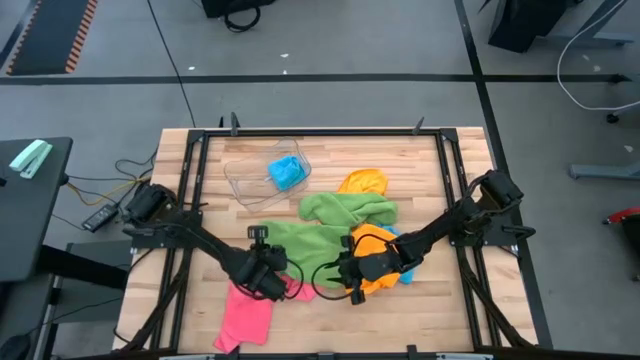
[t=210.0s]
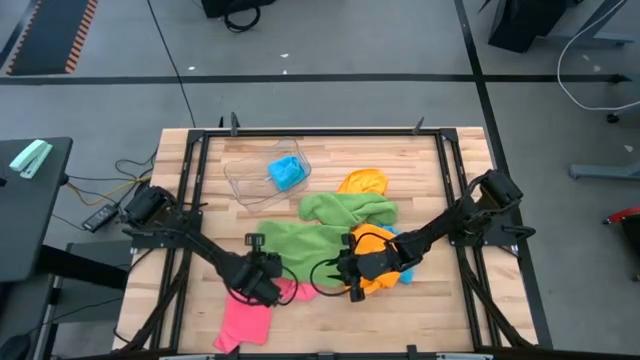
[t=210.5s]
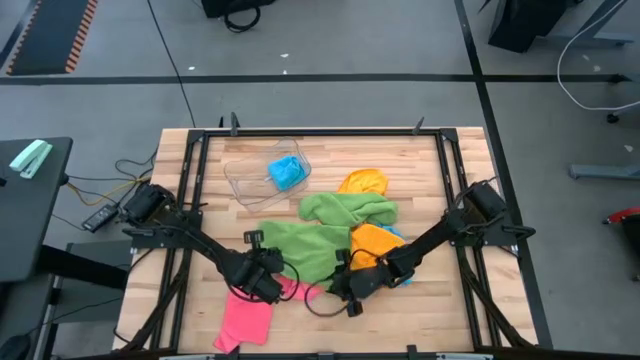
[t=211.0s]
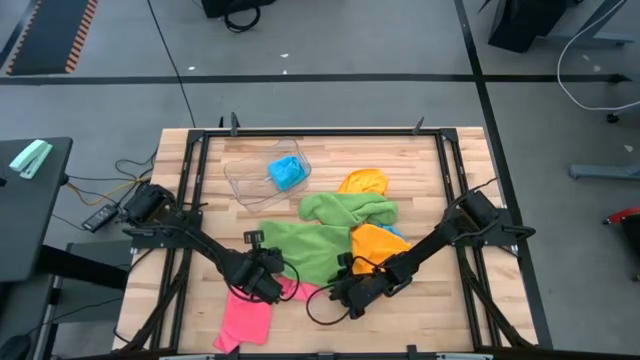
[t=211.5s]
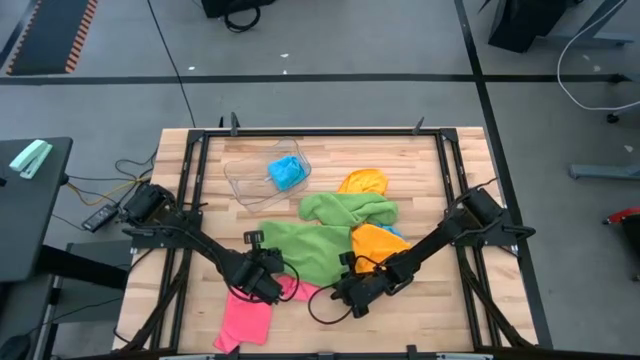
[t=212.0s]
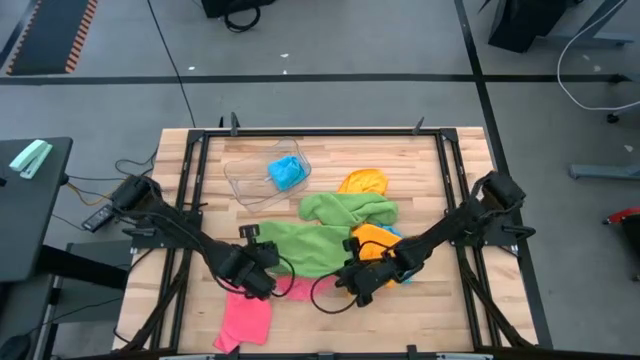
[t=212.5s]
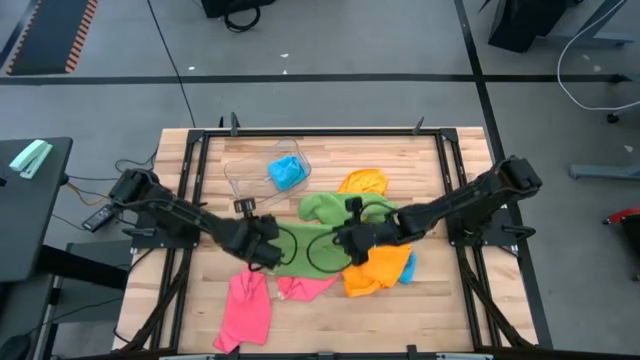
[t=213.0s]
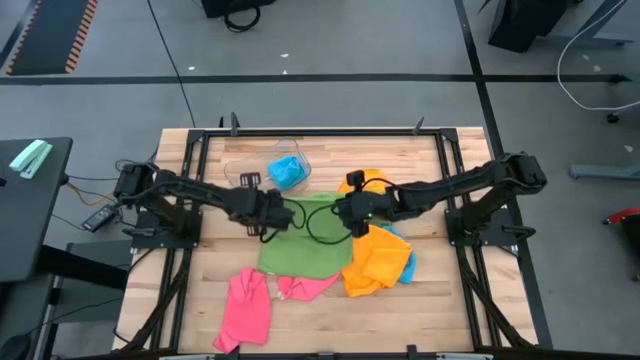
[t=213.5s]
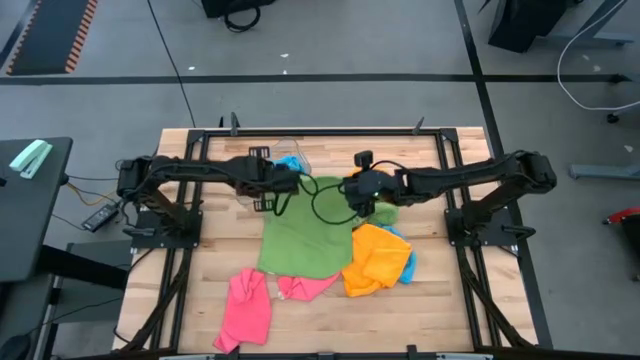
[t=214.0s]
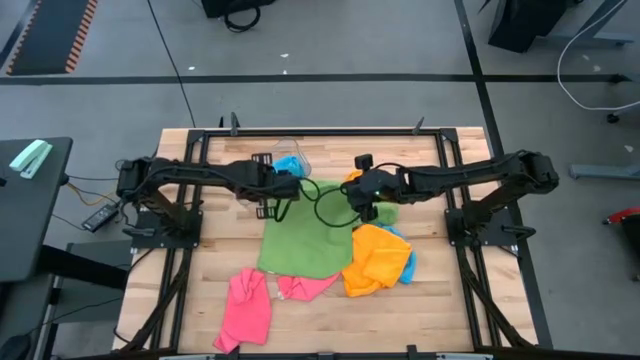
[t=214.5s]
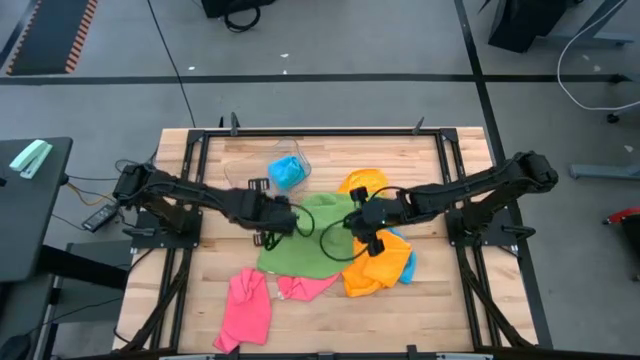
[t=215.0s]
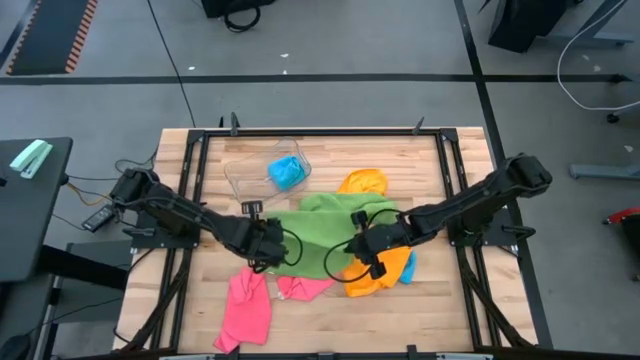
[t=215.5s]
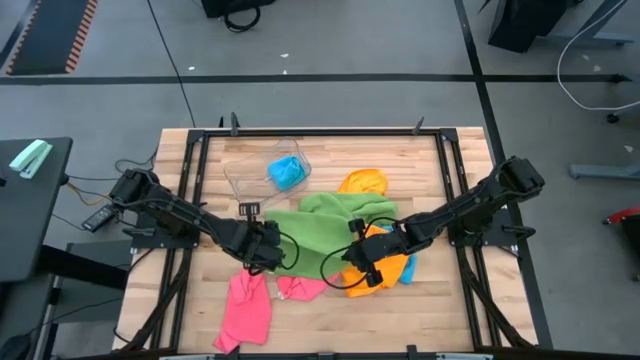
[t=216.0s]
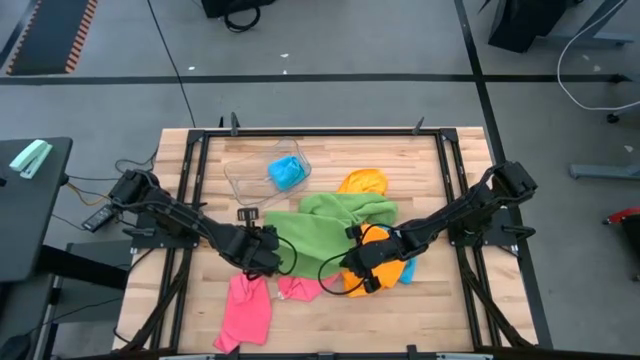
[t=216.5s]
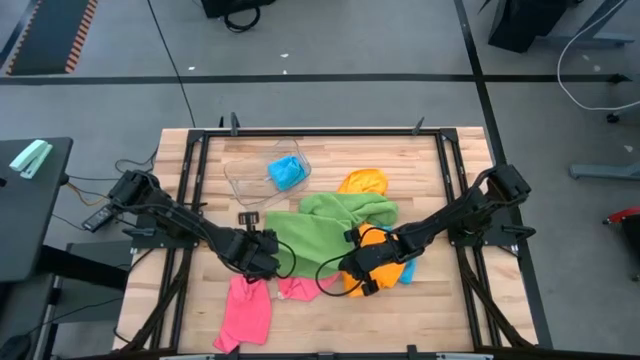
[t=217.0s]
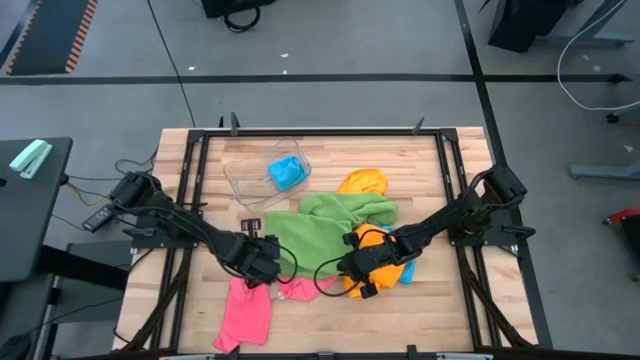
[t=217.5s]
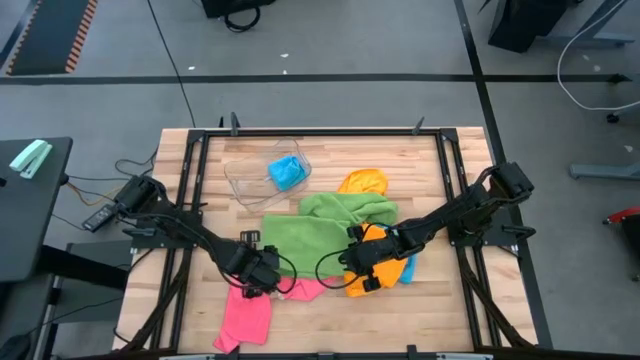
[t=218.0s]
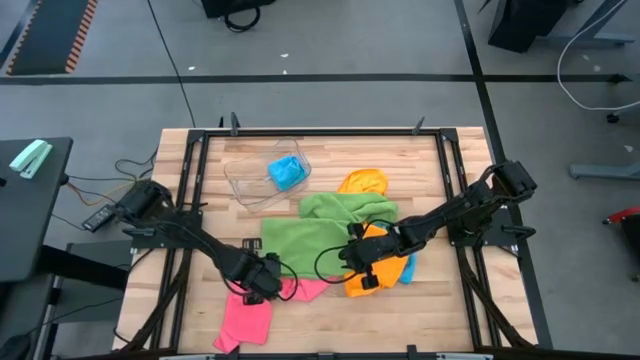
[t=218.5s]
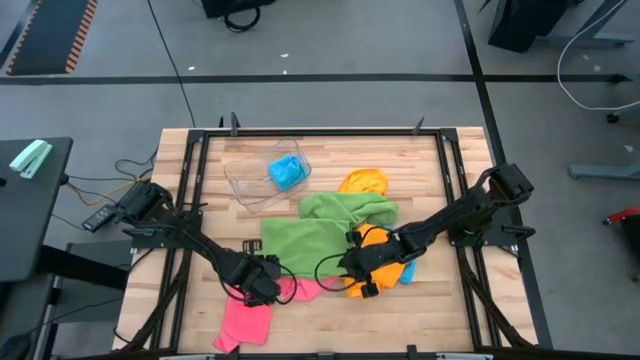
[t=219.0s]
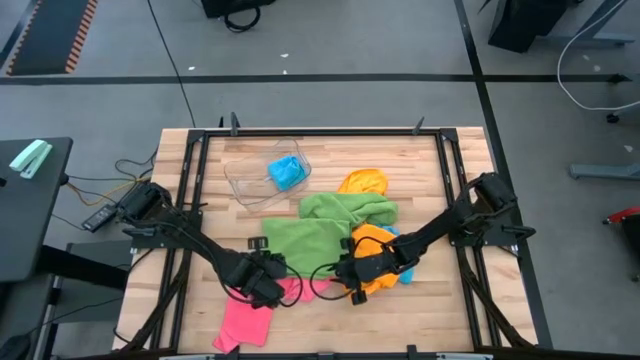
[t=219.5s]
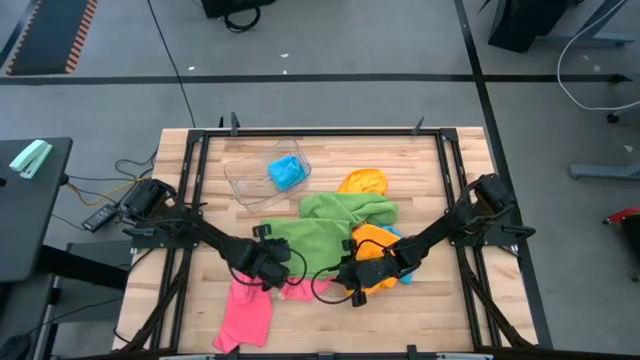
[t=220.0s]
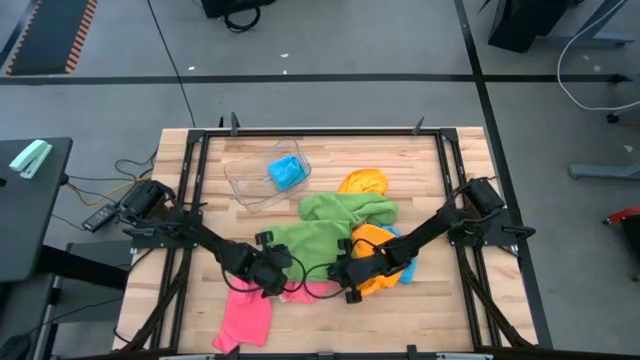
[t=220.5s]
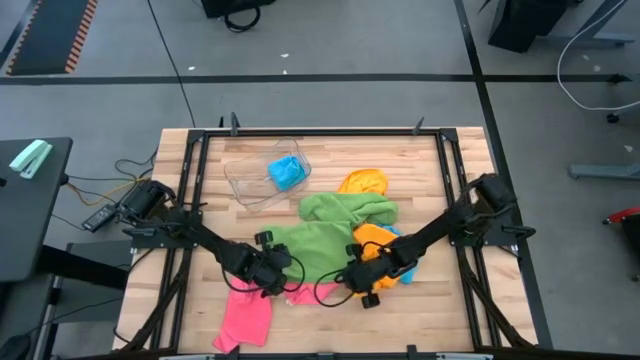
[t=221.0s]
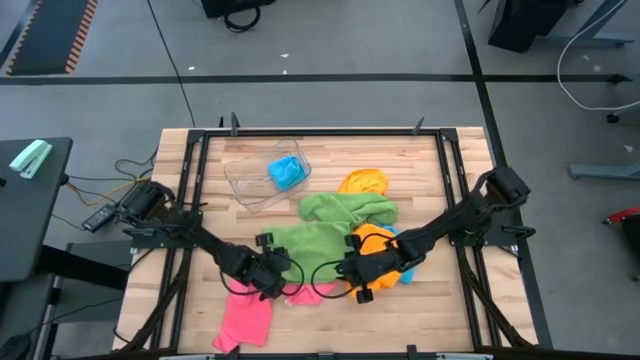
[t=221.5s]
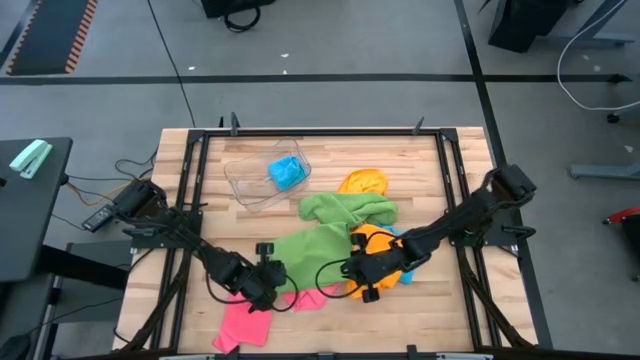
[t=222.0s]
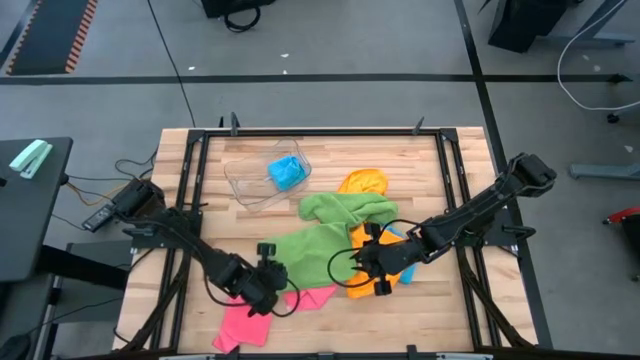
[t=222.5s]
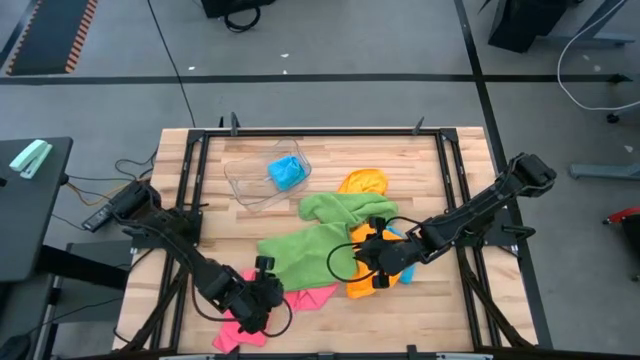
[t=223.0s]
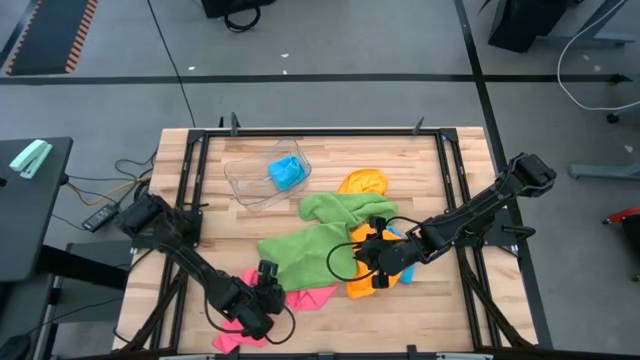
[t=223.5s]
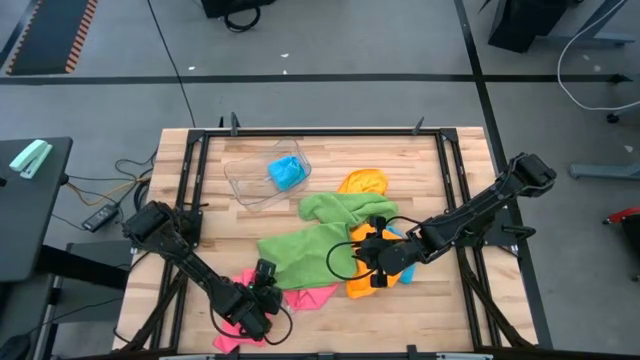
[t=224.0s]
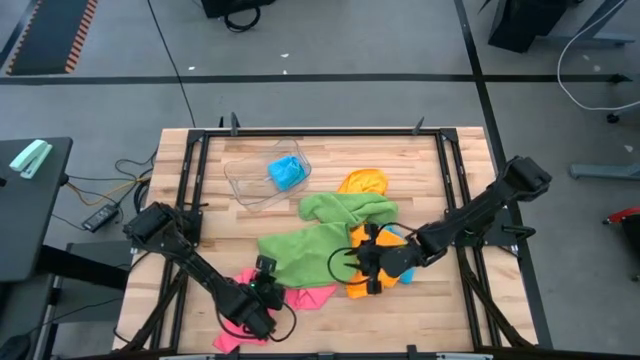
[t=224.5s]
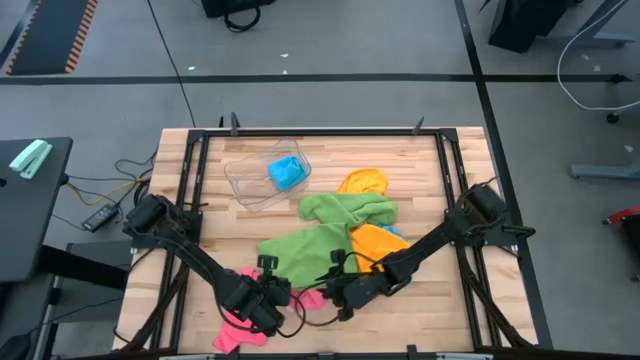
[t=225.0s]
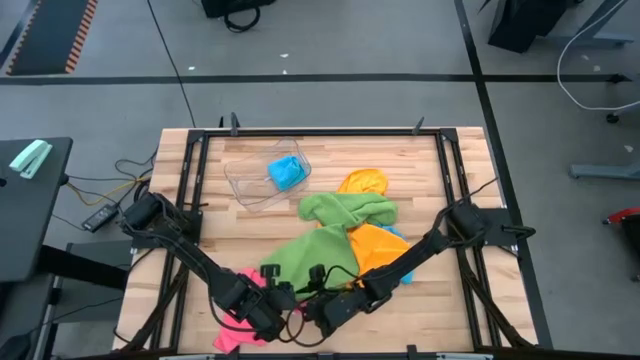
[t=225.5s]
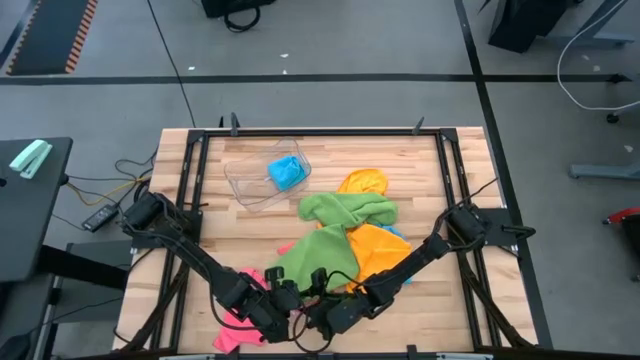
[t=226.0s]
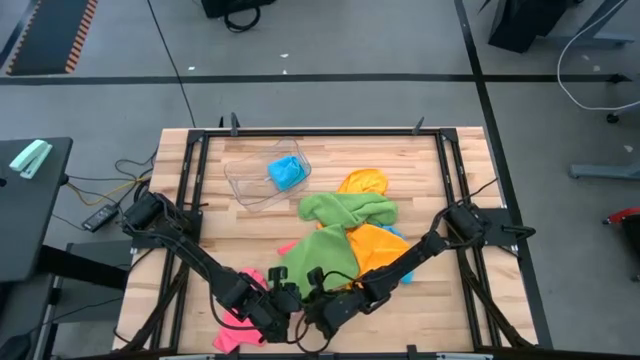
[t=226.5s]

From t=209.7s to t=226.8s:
Task: Fold microfiber towels
Fold the left green microfiber towel

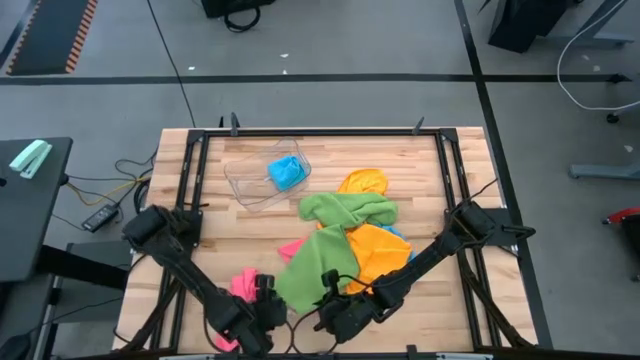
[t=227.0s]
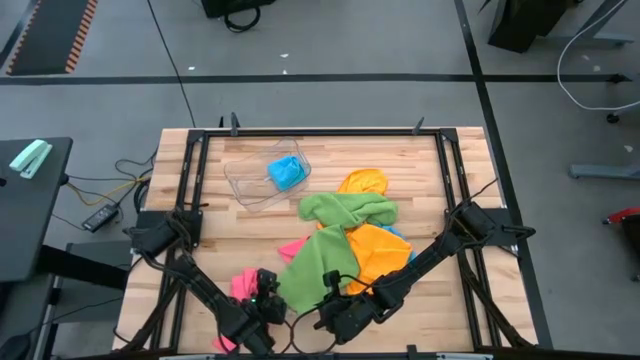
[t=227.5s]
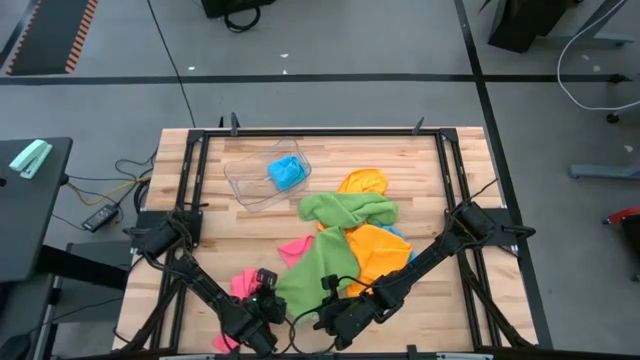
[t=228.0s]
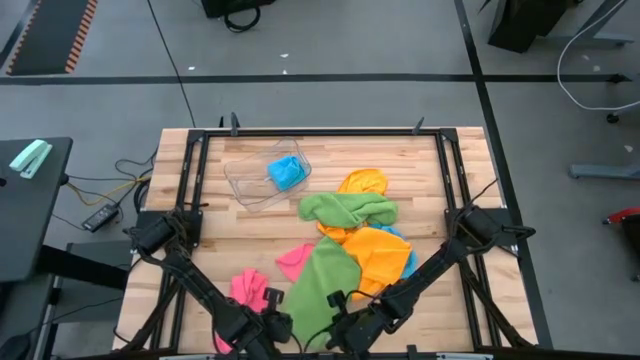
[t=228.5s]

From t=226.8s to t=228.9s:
Fold the left green microfiber towel

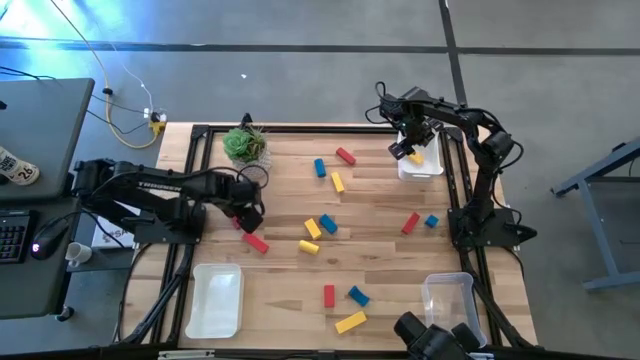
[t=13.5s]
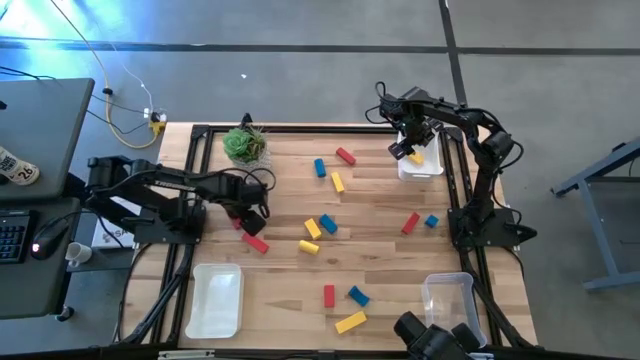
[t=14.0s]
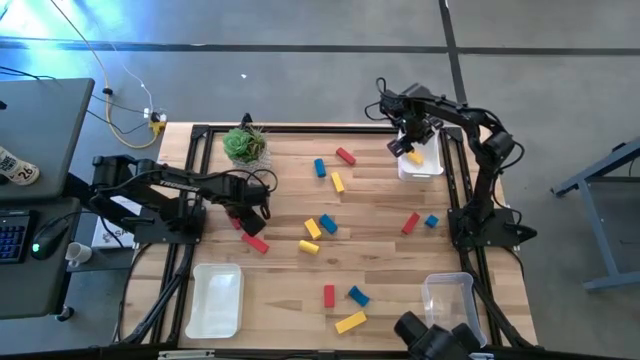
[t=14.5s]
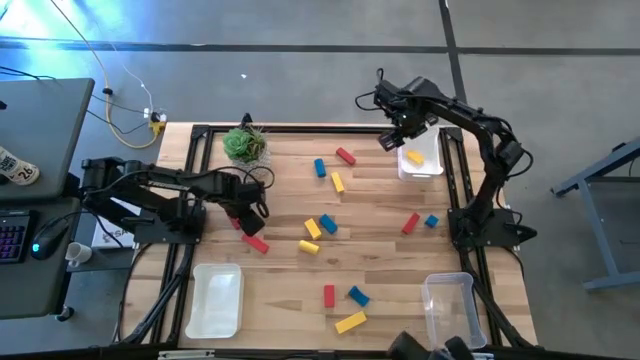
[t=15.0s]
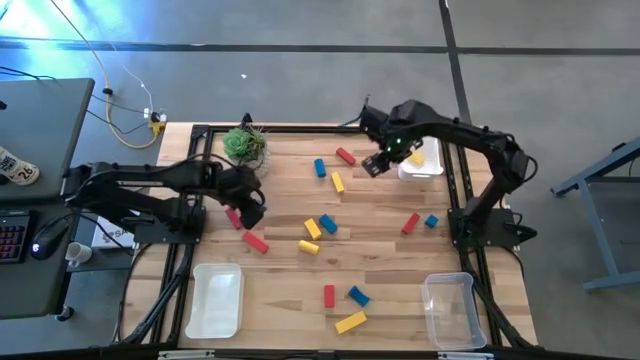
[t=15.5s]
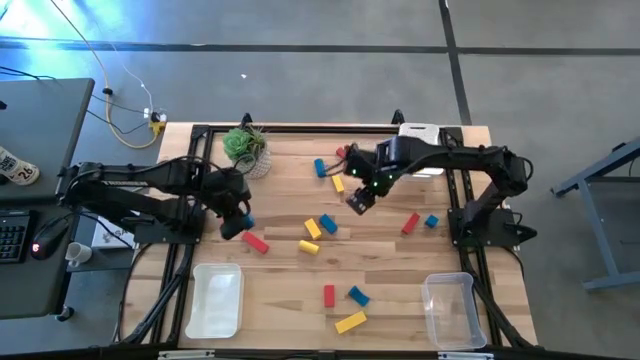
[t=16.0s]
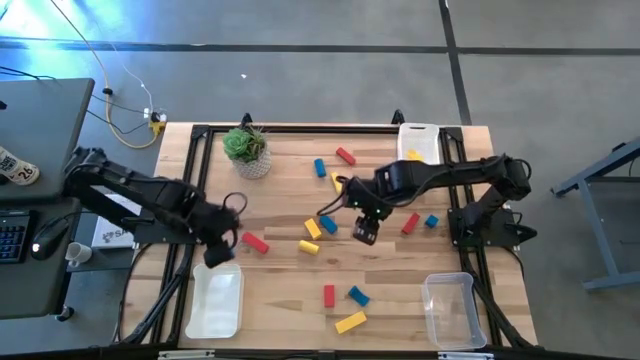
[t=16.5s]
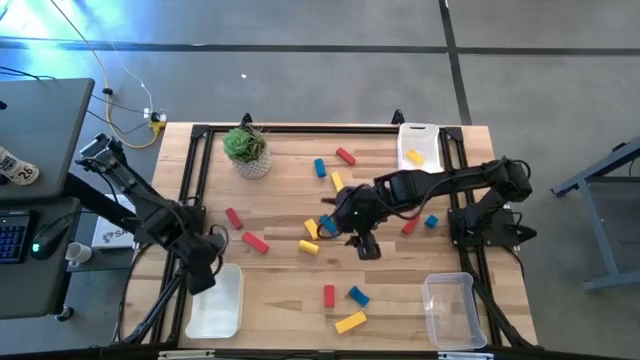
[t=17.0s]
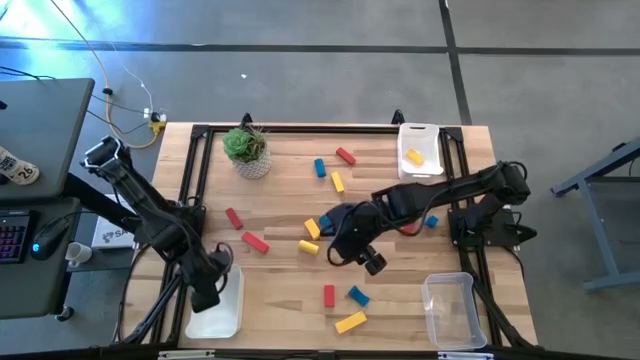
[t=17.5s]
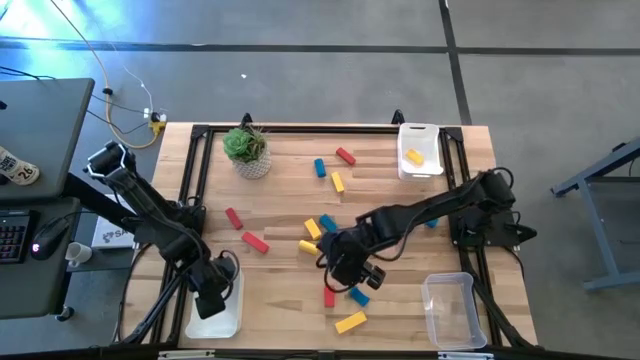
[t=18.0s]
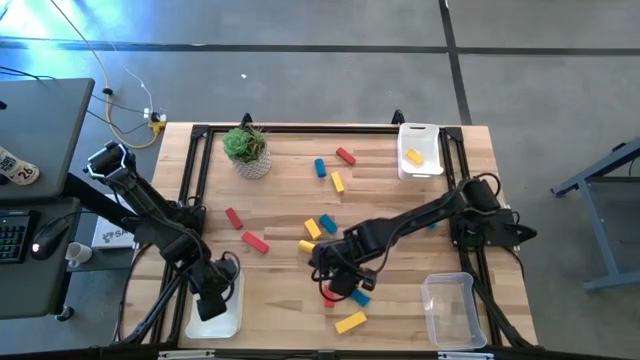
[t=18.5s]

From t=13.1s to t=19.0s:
Task: Sort & place blocks by color
Put the blue block into the bottom white bin
